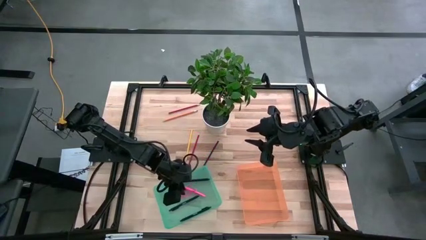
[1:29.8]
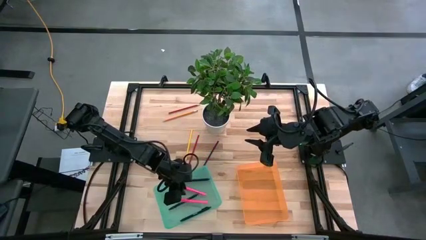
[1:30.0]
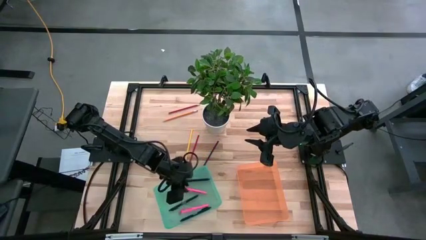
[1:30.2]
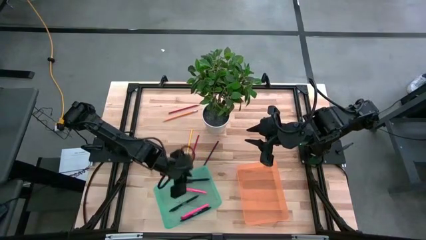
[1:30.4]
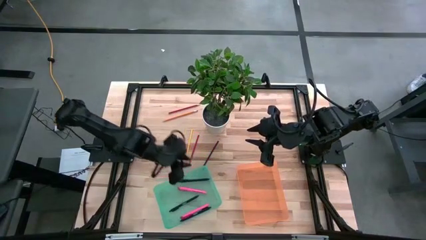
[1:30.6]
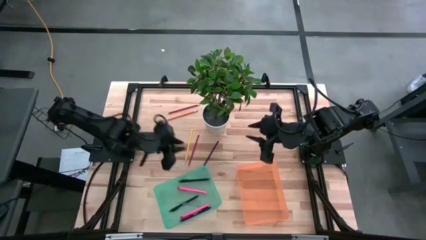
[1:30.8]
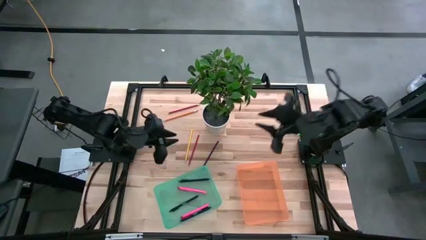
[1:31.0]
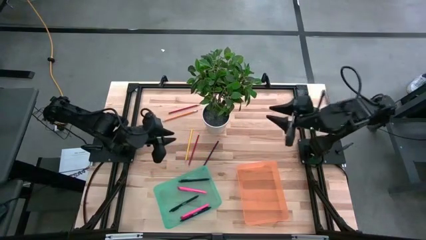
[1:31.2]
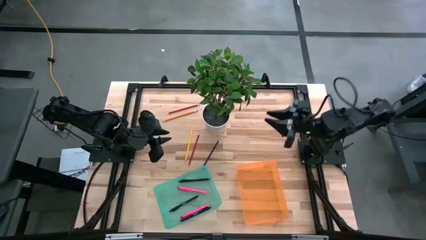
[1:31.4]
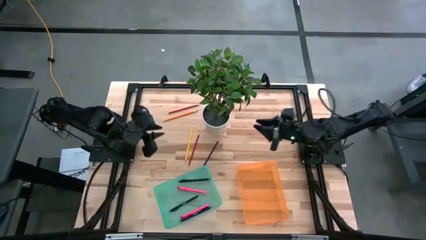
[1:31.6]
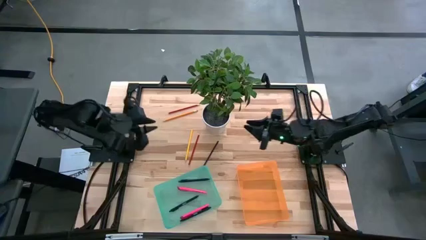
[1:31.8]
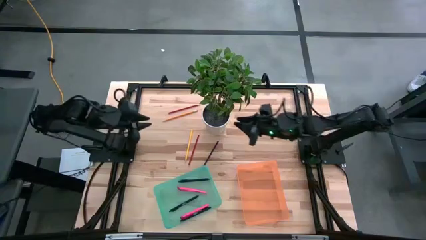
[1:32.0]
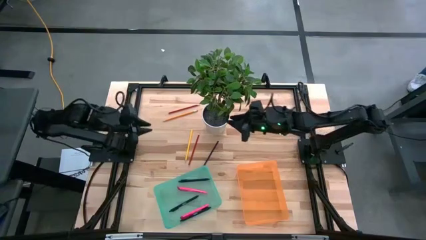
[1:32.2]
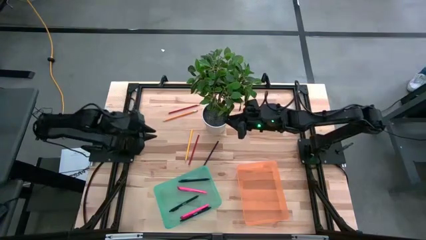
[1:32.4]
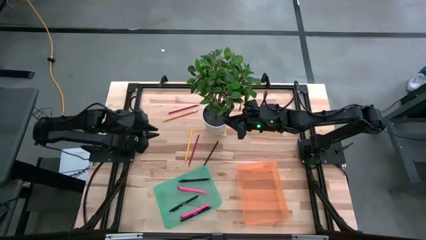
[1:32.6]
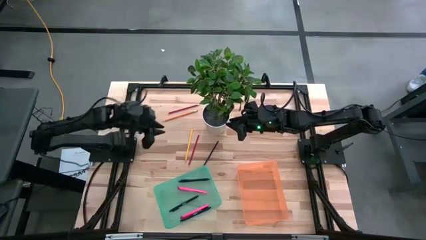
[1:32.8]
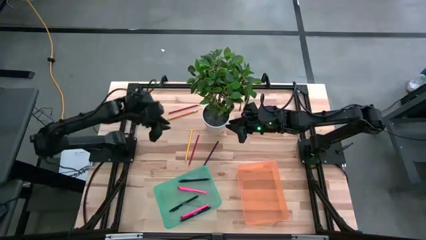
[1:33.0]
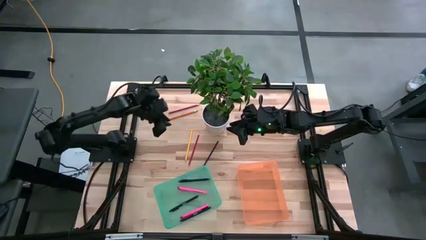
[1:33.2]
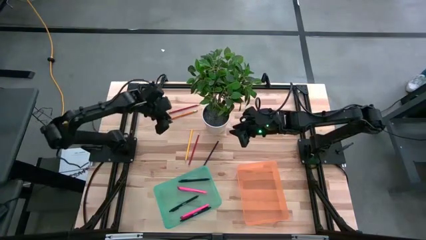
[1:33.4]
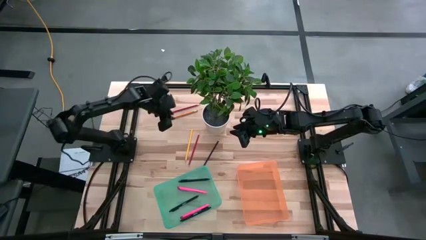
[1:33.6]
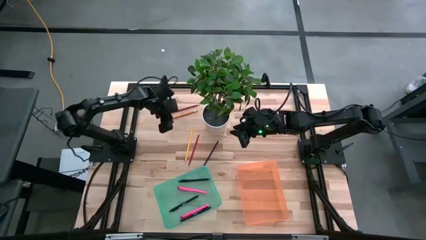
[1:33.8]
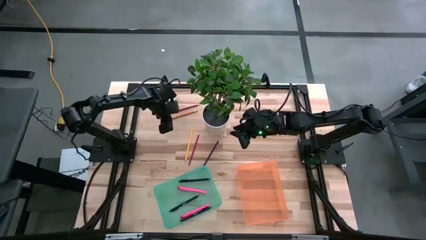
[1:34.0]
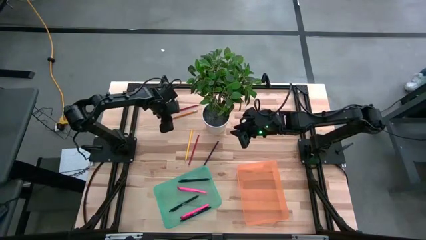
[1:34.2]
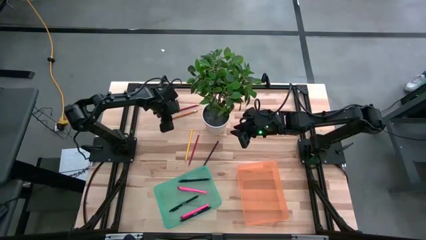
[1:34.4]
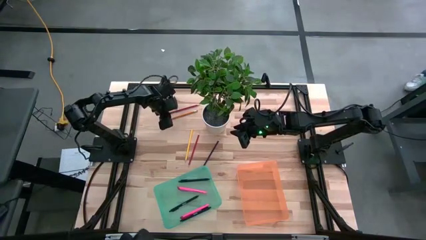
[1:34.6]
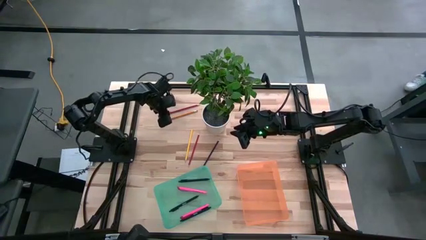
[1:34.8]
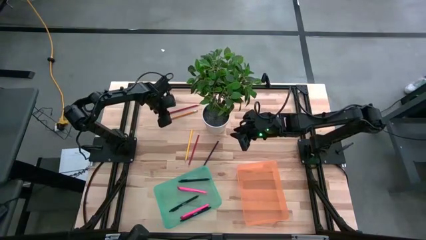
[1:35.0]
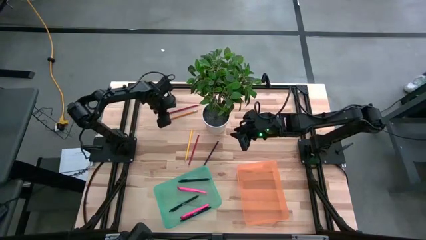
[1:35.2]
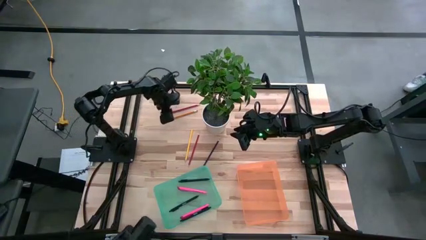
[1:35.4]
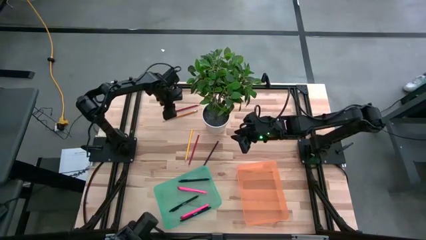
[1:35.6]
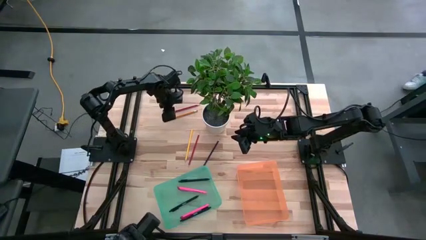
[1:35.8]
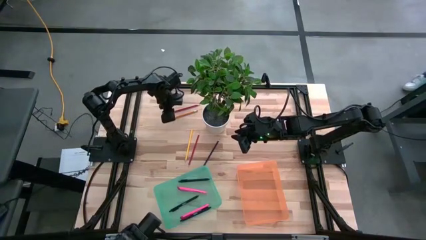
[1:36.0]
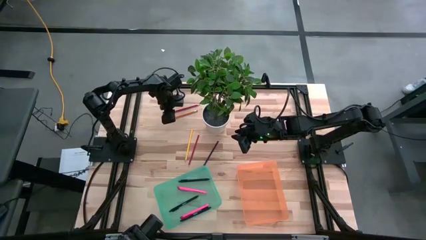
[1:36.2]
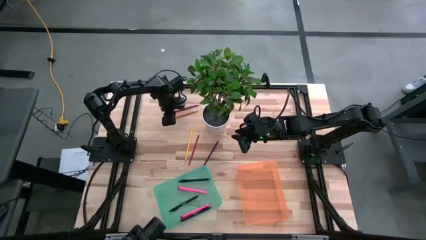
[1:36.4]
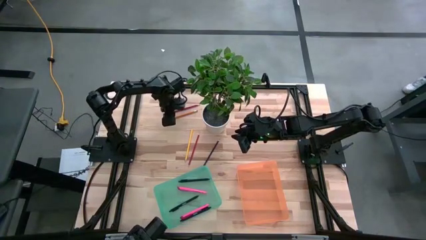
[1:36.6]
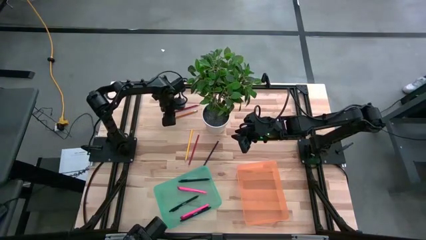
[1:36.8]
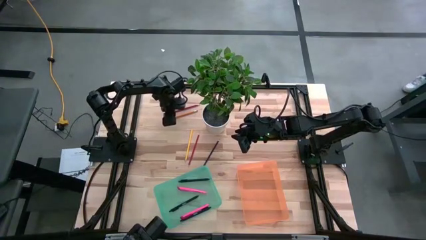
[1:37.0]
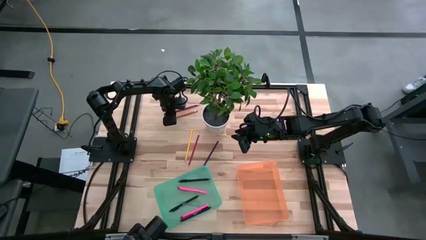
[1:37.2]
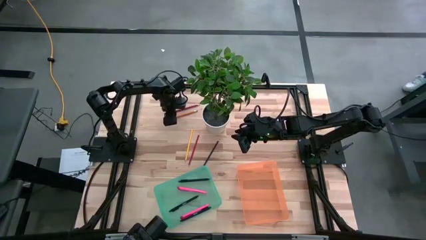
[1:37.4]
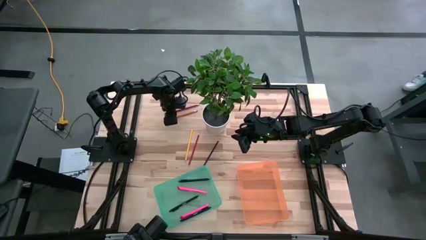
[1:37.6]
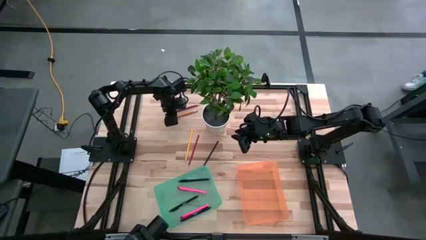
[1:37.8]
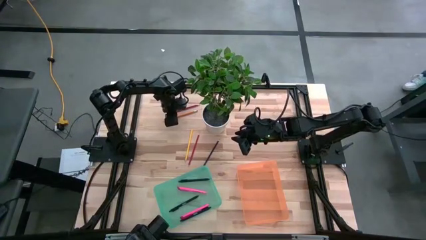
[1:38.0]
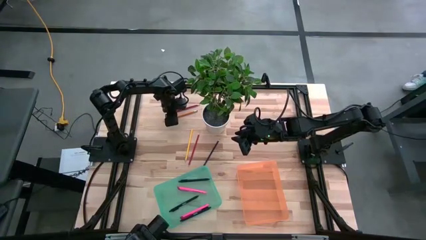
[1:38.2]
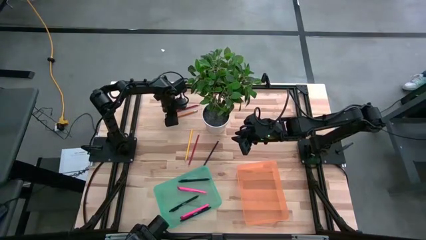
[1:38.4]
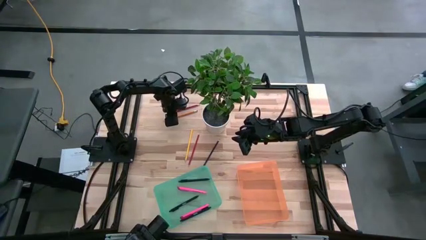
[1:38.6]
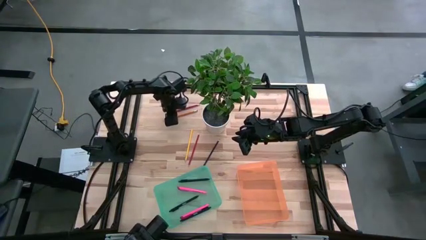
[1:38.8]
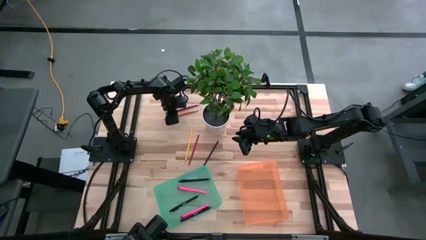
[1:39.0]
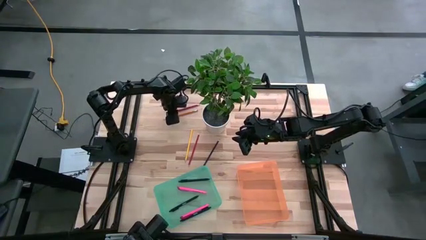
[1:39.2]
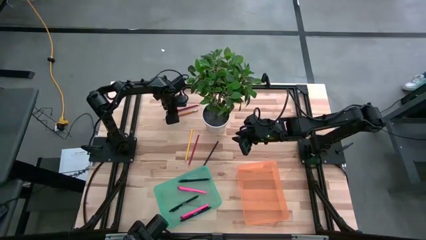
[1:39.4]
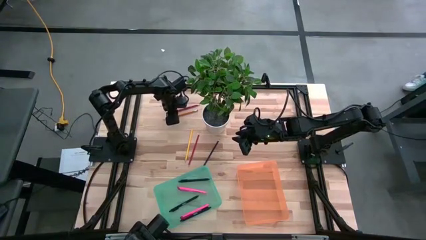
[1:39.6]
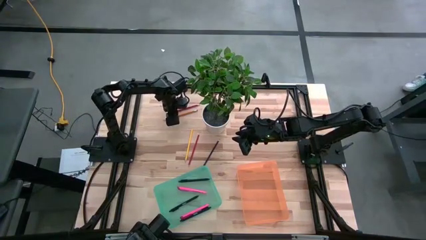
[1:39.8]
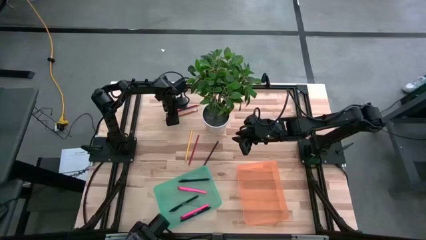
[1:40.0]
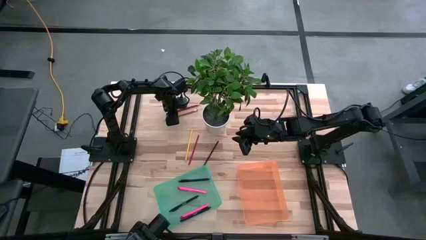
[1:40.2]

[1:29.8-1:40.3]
Task: Sort pens & pencils
Put the orange pencil into the orange bin
